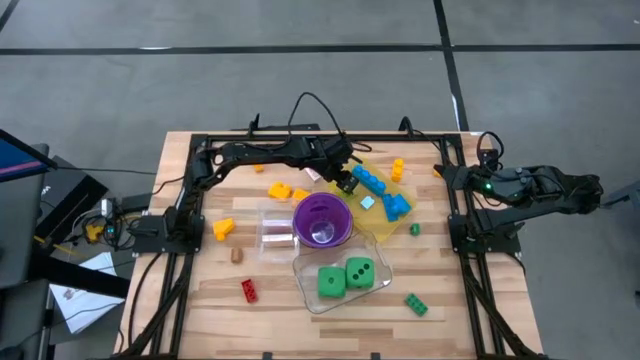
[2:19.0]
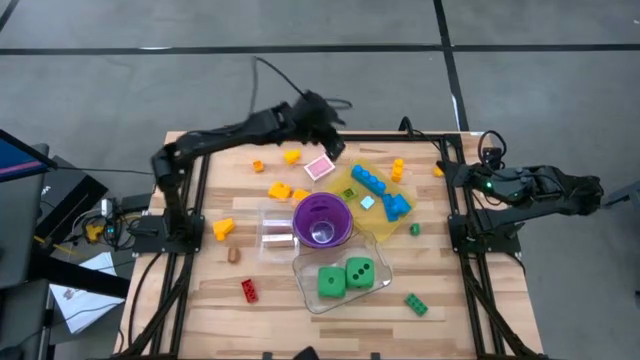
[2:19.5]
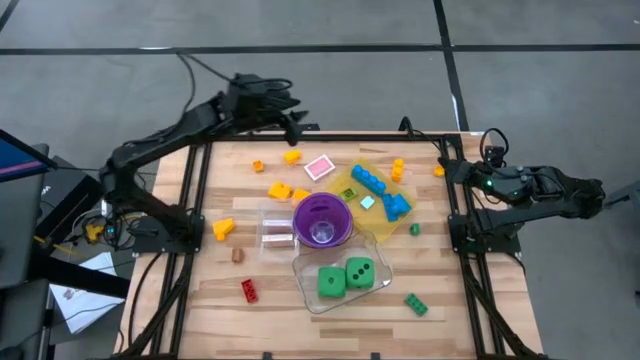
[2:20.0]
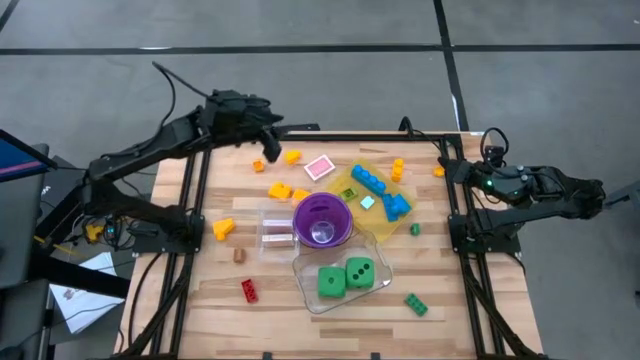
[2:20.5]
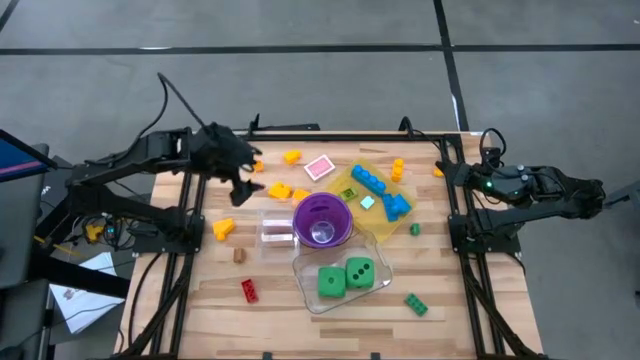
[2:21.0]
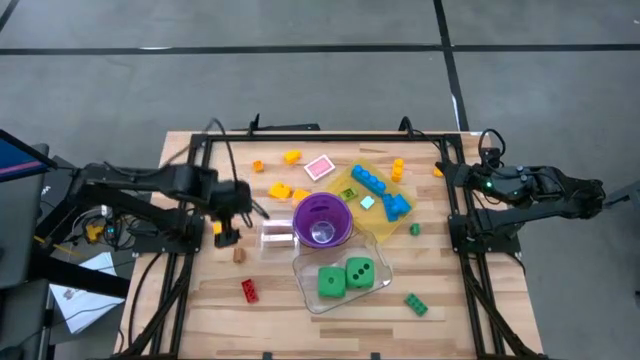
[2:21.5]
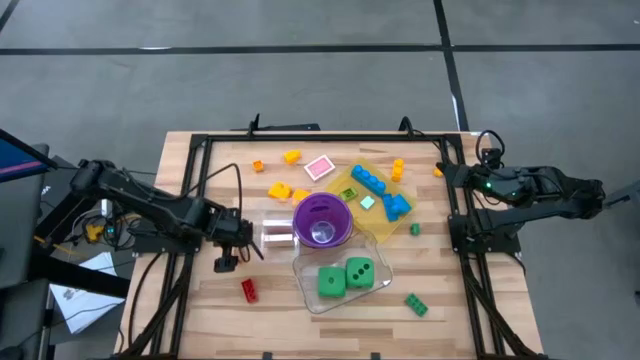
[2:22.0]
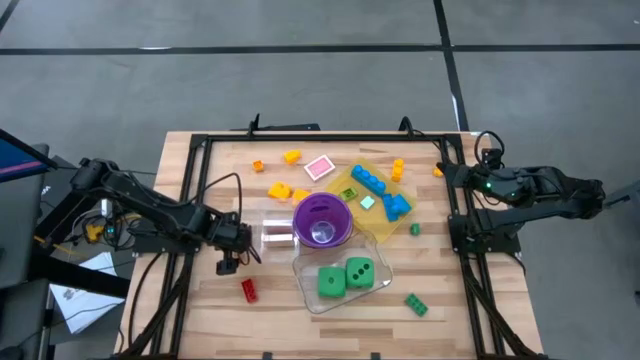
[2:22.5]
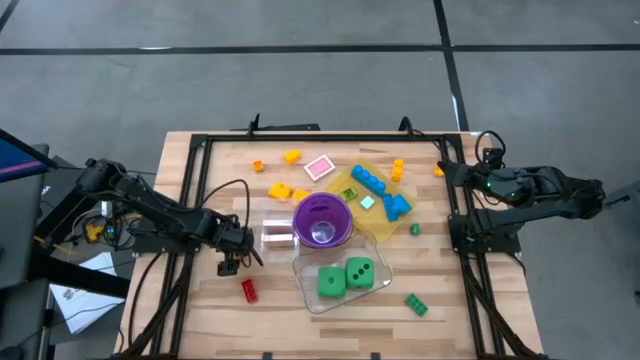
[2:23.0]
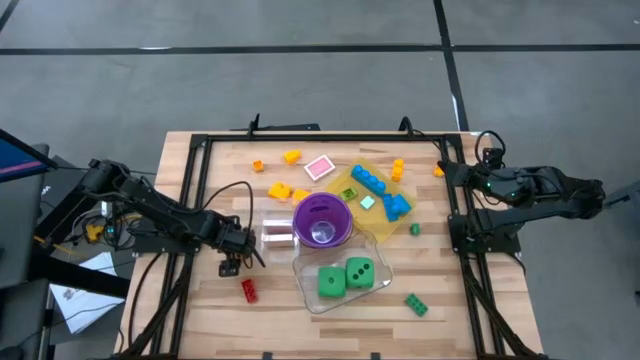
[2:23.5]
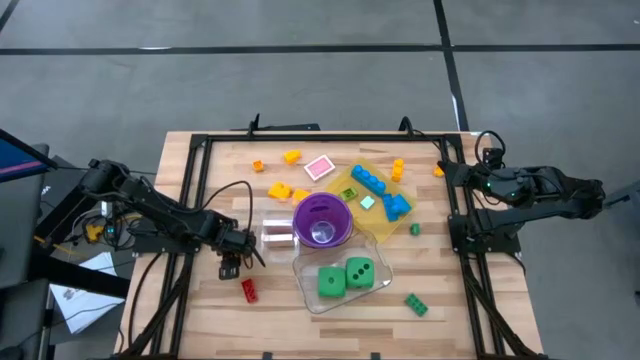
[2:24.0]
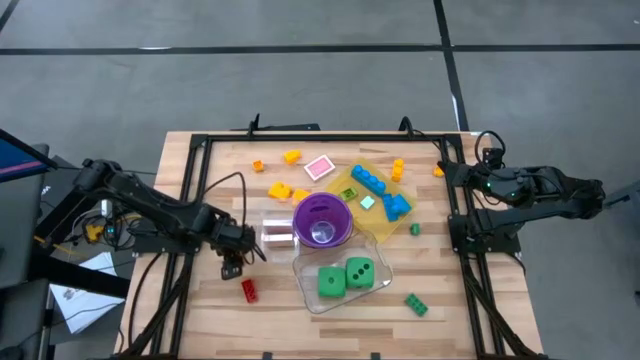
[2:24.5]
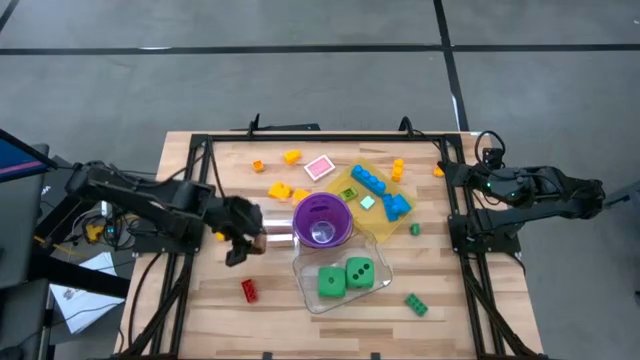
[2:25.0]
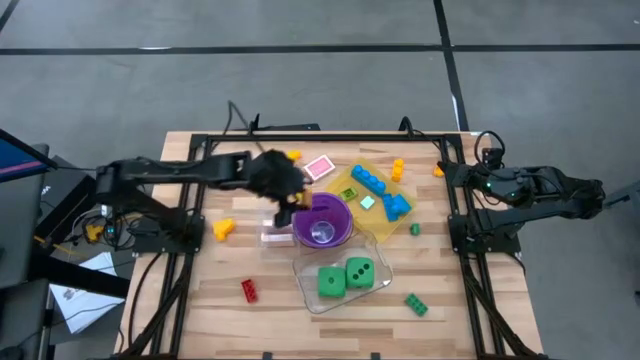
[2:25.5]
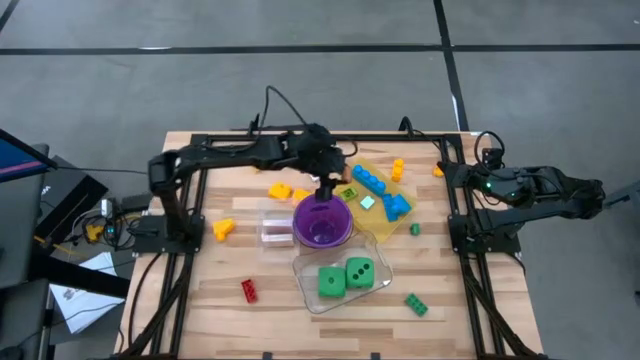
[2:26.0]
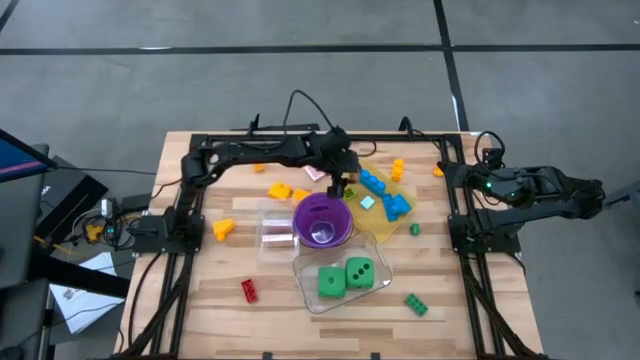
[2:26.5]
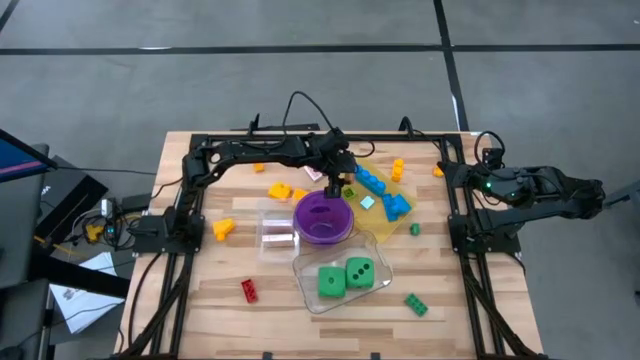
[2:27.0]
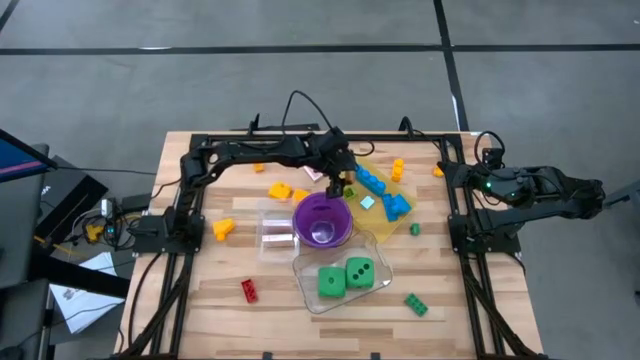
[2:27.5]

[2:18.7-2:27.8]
Task: Pick & Place Toys
Put the small brown game piece into the yellow bin

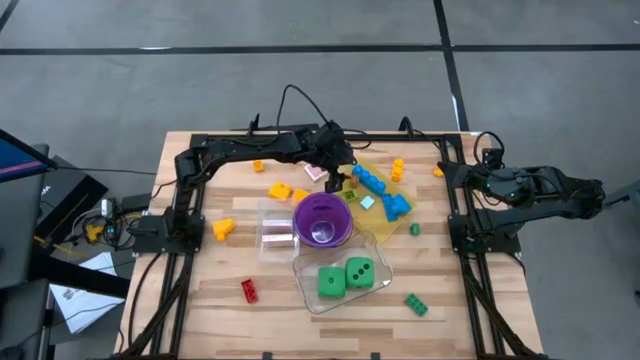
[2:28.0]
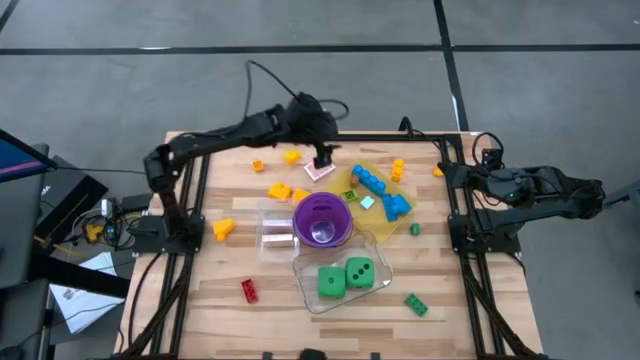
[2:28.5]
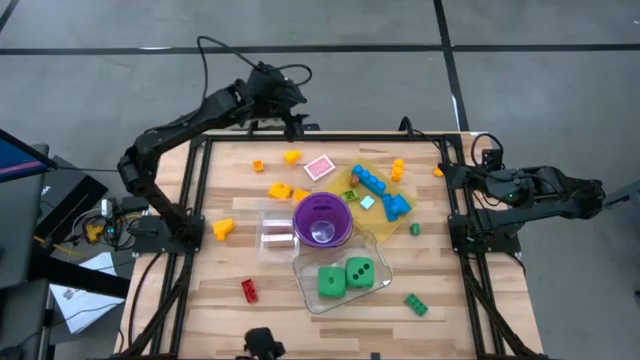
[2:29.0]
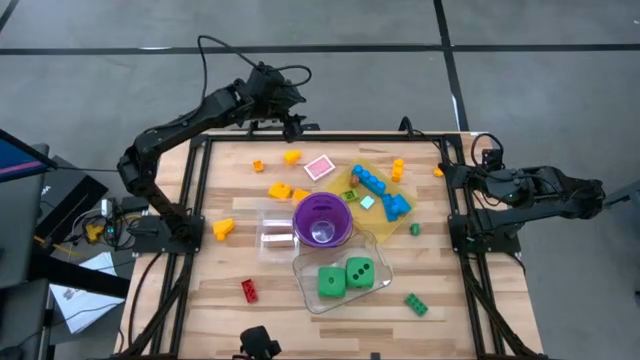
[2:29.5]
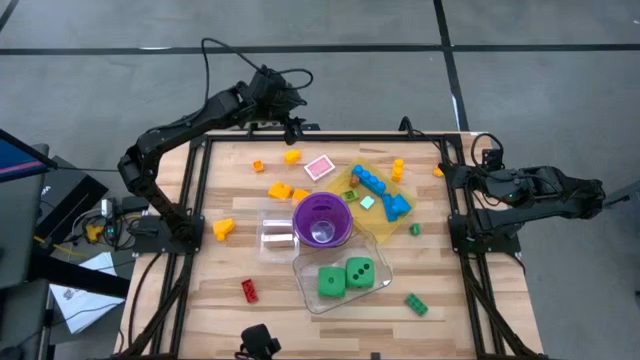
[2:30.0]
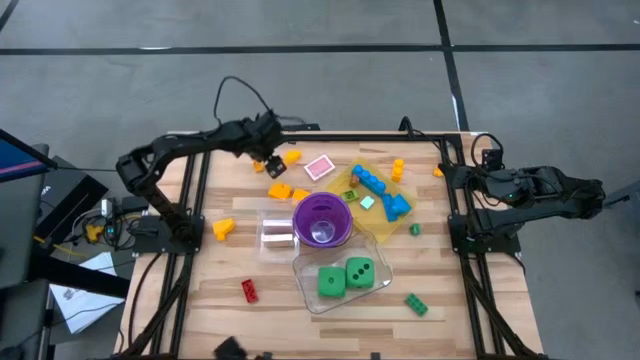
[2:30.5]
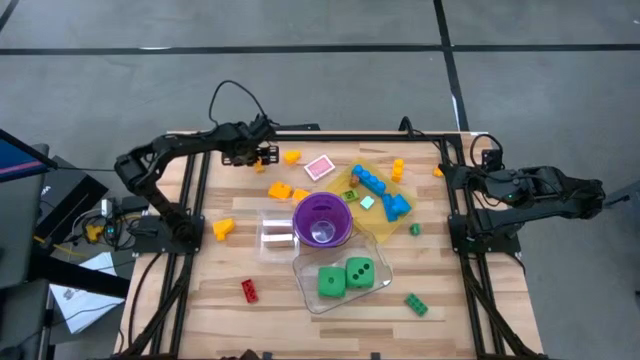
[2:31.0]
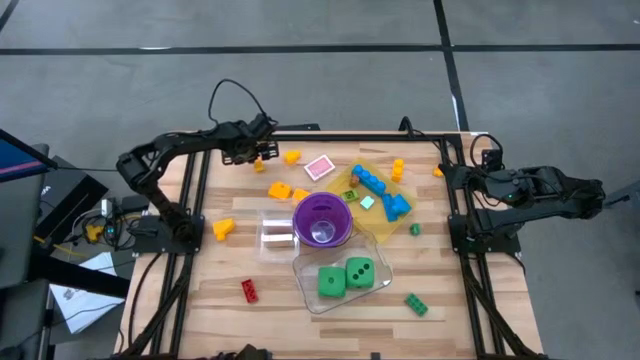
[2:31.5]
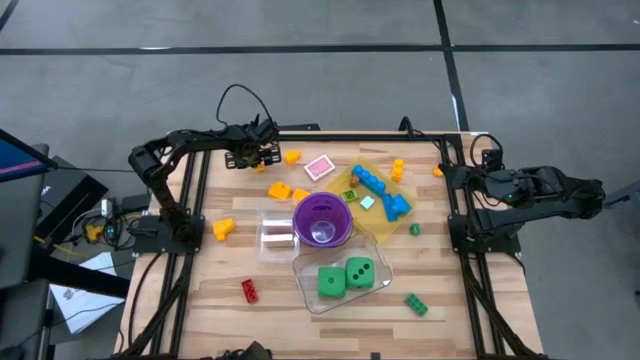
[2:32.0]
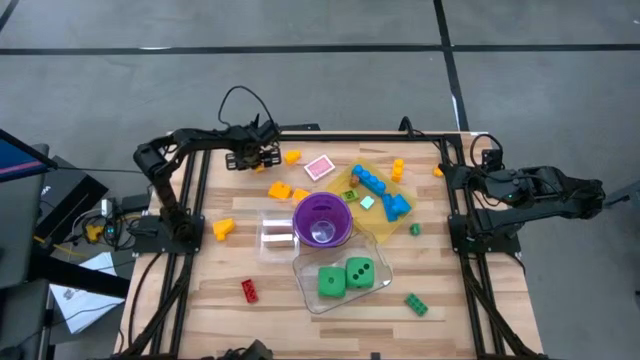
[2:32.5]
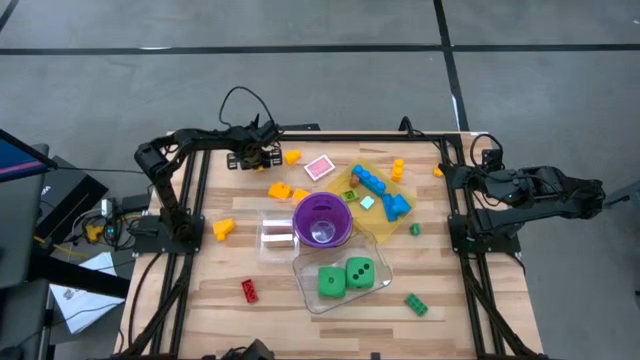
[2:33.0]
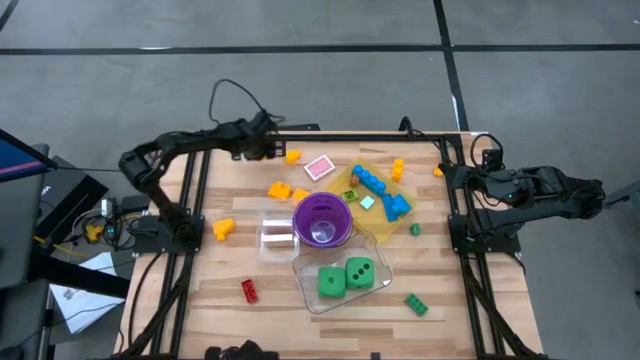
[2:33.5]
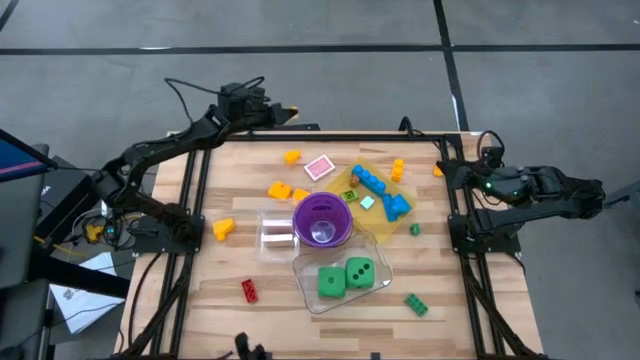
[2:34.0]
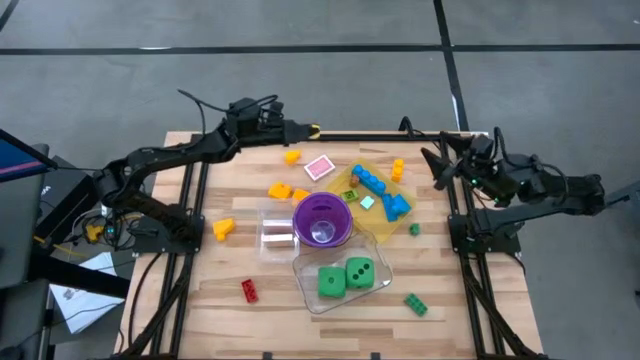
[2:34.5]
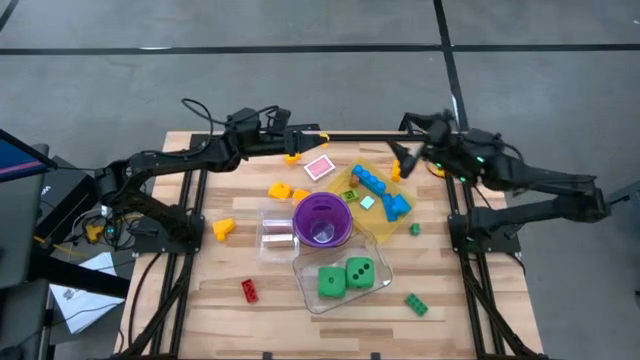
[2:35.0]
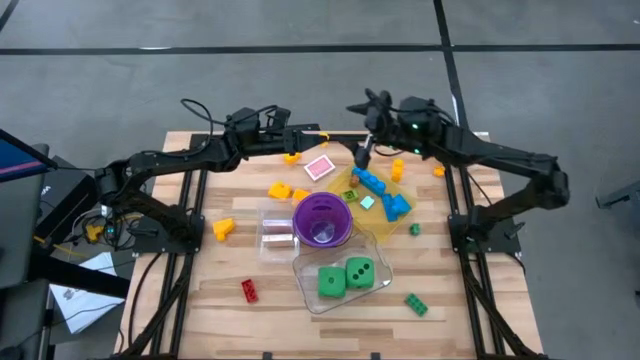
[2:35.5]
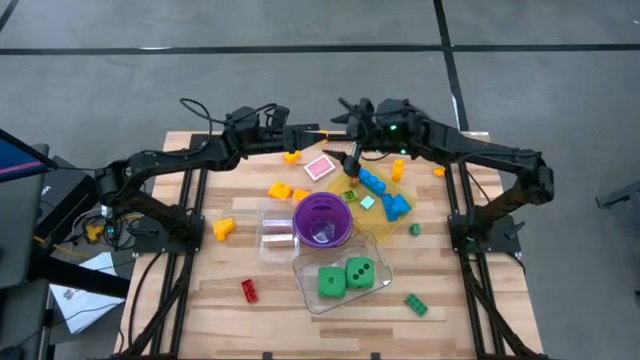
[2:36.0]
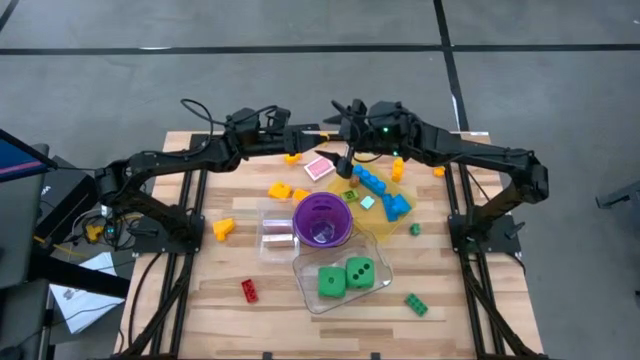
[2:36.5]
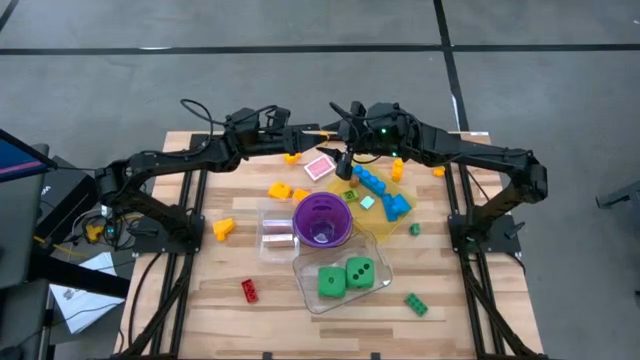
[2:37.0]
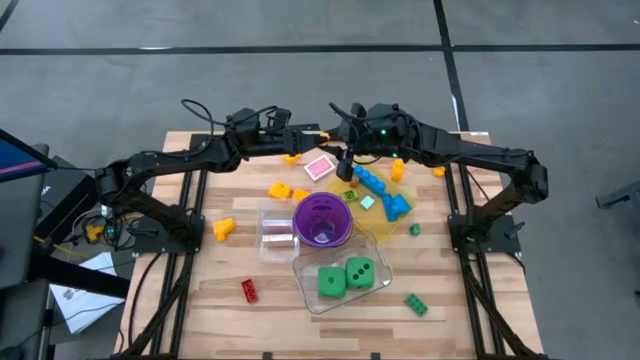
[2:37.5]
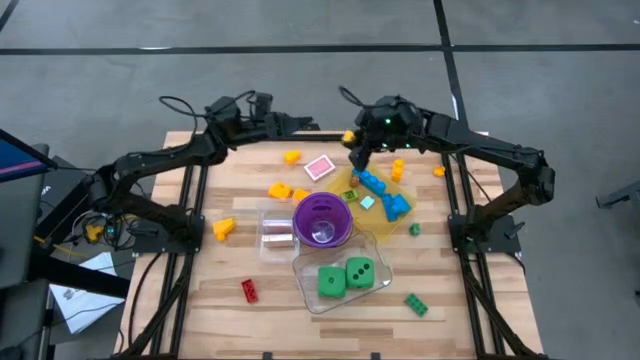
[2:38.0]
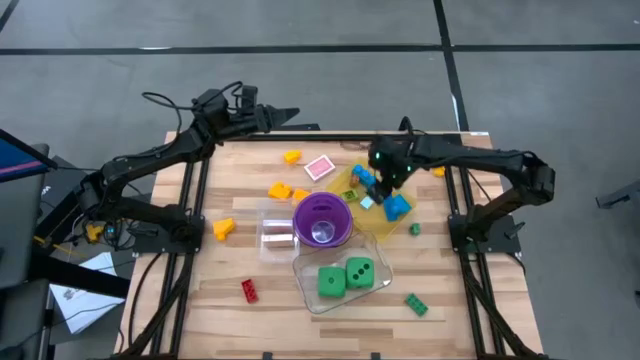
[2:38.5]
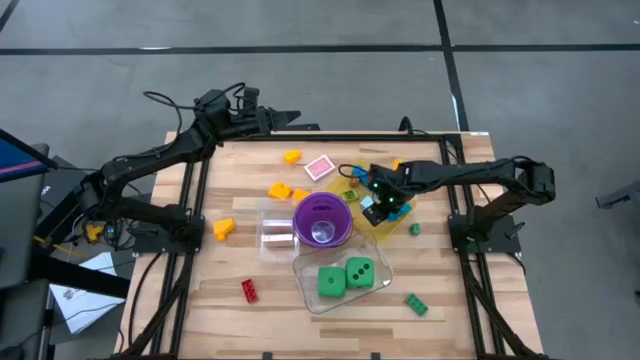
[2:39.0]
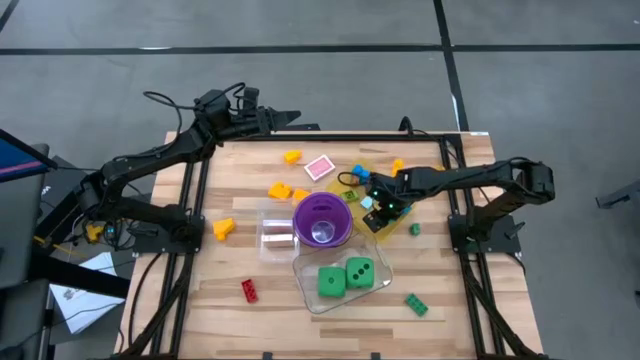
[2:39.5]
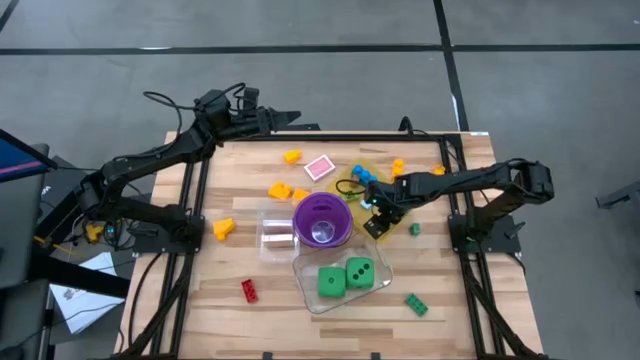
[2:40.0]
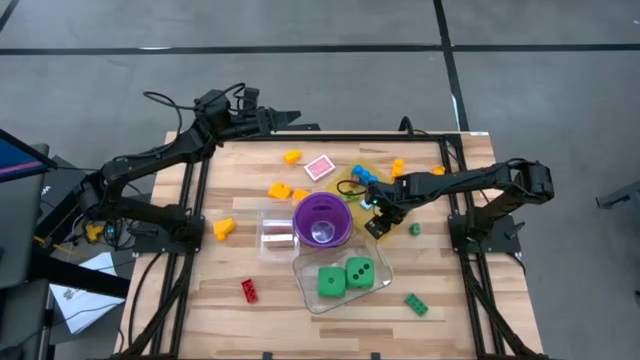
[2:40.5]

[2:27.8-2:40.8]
Put the small yellow game piece into the yellow bin
